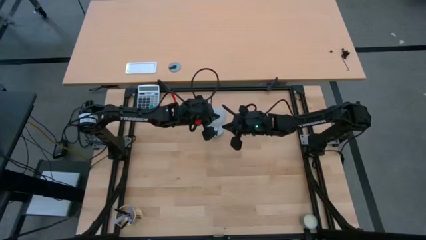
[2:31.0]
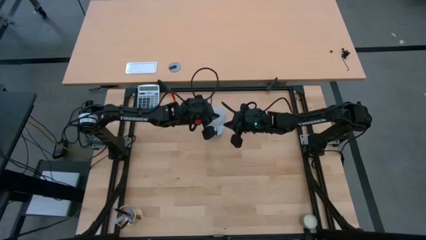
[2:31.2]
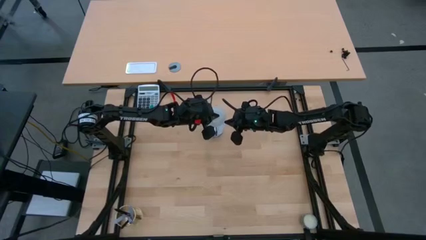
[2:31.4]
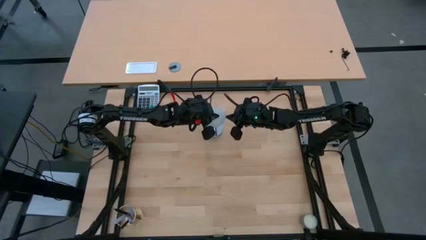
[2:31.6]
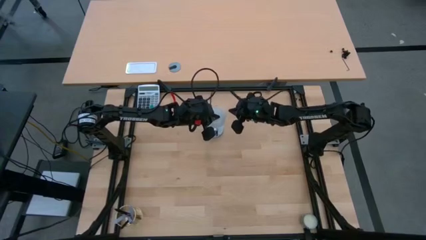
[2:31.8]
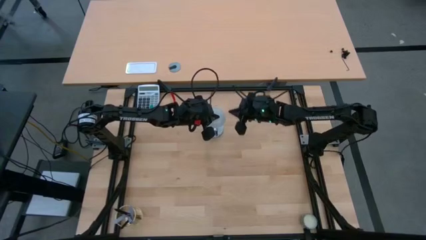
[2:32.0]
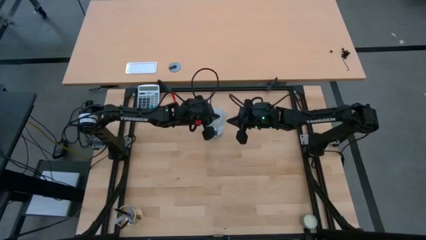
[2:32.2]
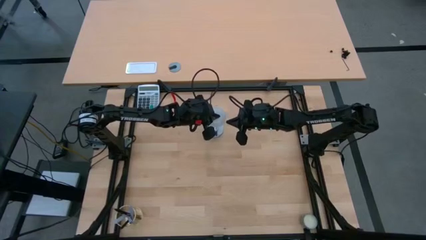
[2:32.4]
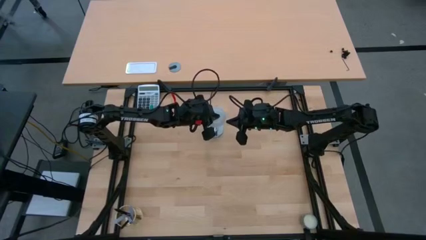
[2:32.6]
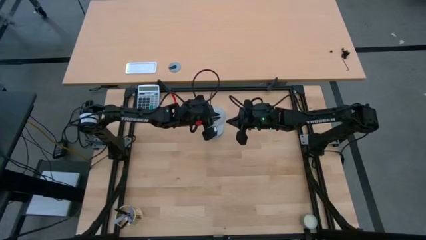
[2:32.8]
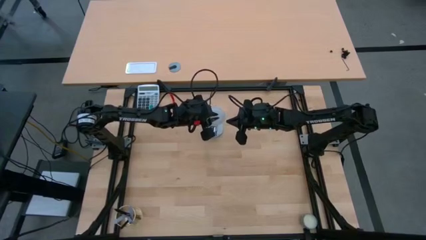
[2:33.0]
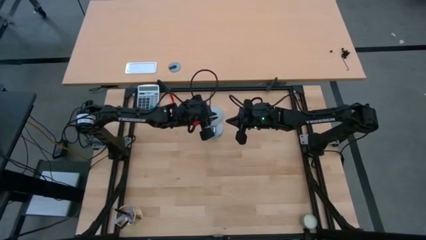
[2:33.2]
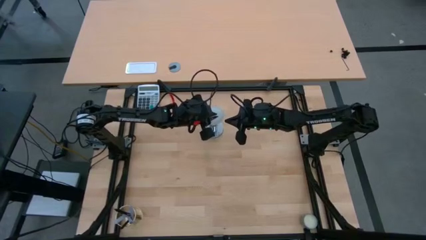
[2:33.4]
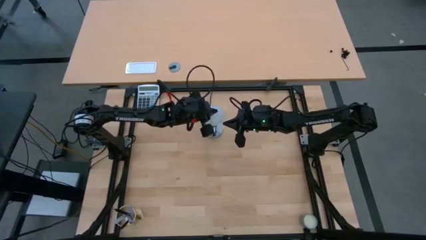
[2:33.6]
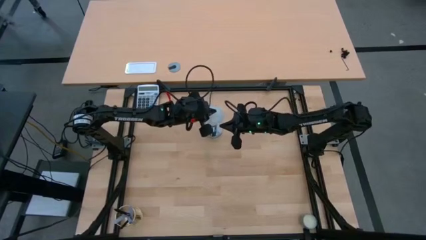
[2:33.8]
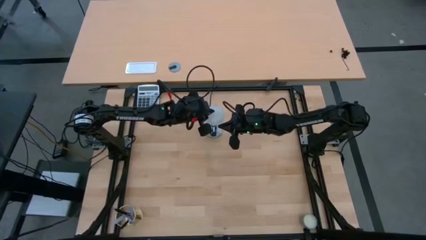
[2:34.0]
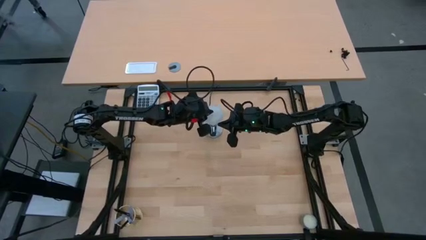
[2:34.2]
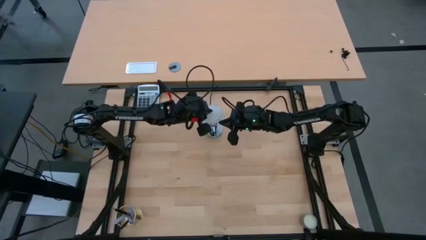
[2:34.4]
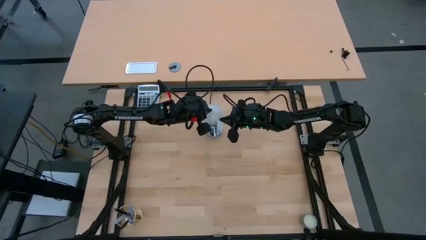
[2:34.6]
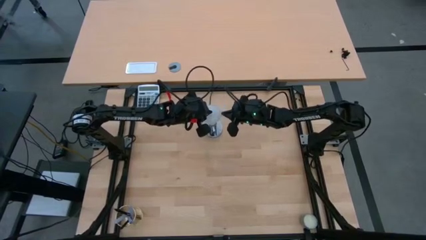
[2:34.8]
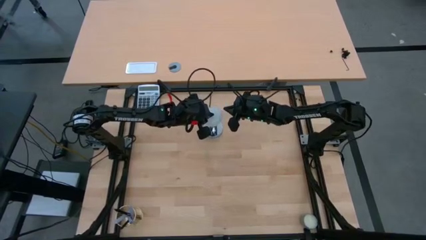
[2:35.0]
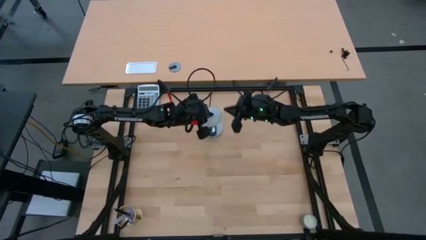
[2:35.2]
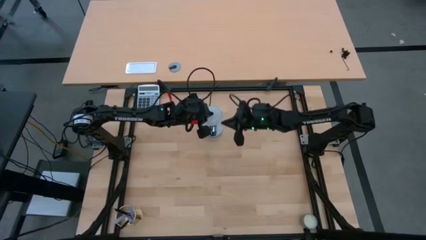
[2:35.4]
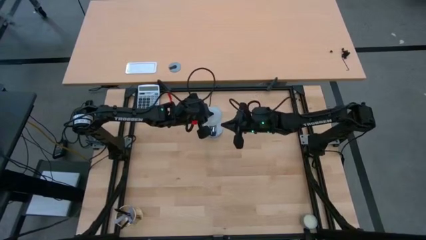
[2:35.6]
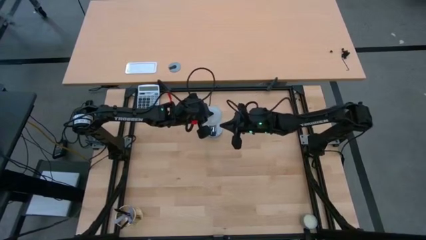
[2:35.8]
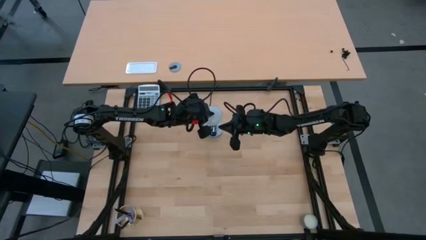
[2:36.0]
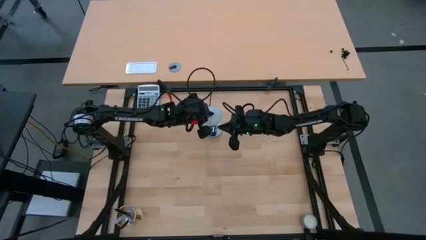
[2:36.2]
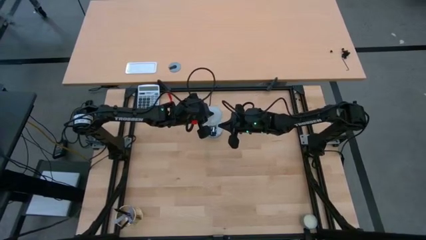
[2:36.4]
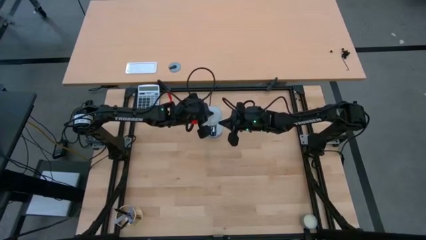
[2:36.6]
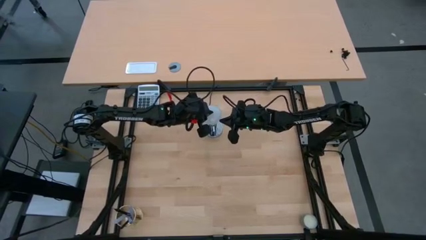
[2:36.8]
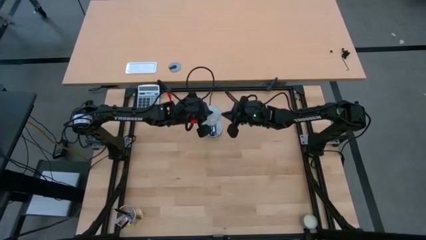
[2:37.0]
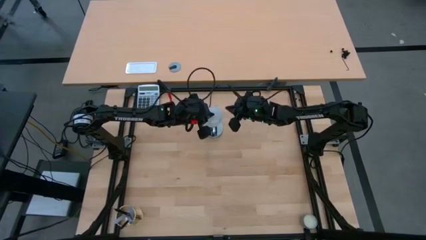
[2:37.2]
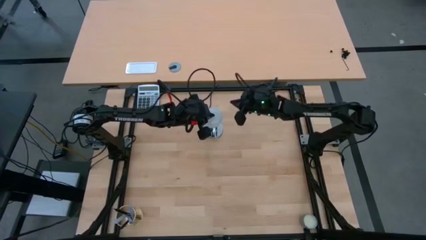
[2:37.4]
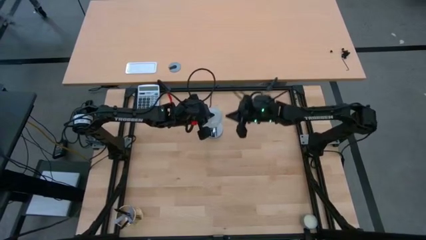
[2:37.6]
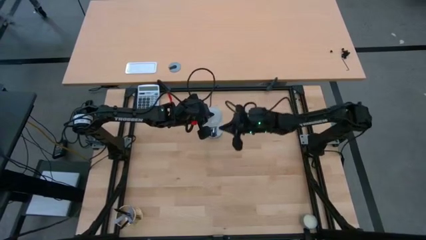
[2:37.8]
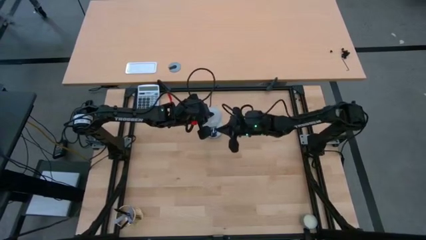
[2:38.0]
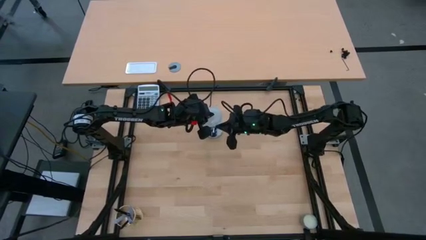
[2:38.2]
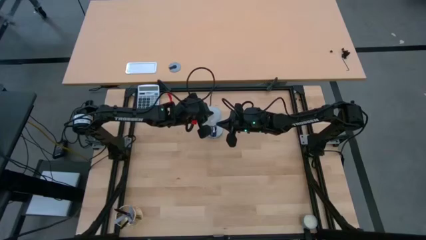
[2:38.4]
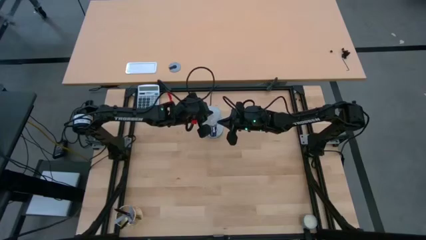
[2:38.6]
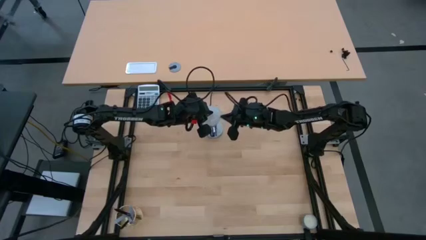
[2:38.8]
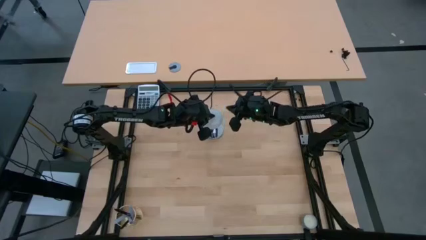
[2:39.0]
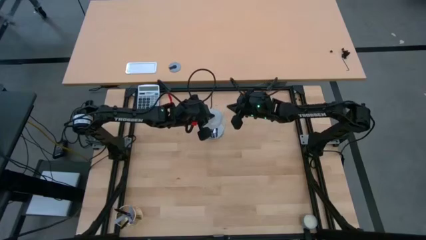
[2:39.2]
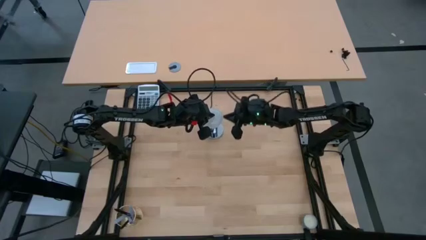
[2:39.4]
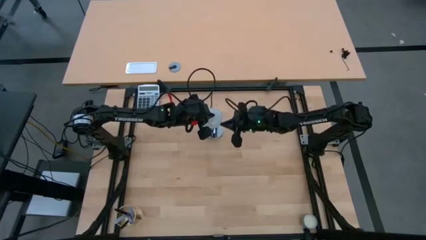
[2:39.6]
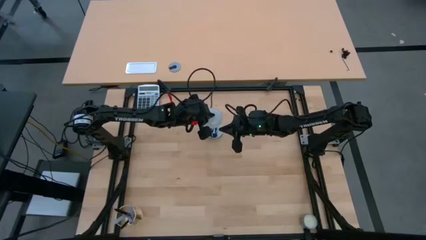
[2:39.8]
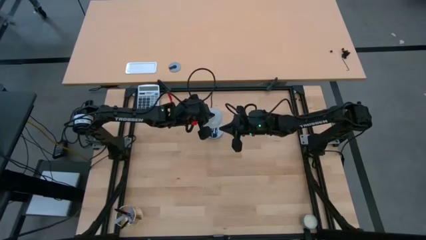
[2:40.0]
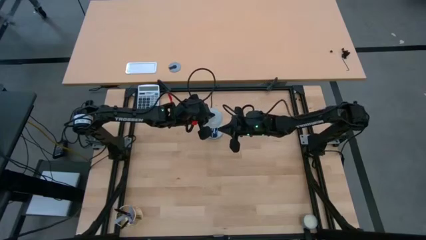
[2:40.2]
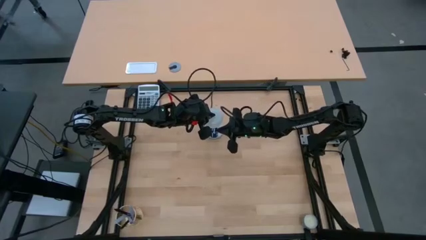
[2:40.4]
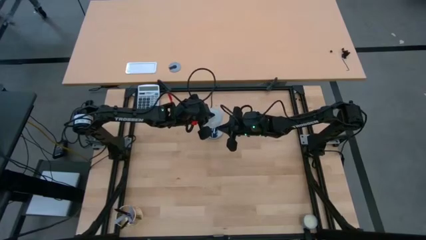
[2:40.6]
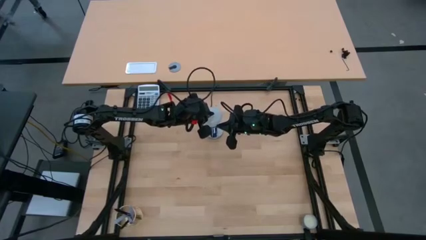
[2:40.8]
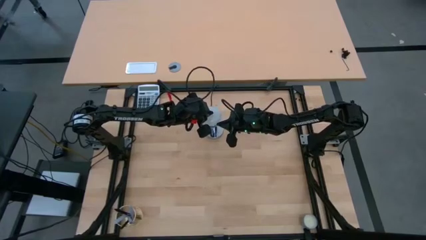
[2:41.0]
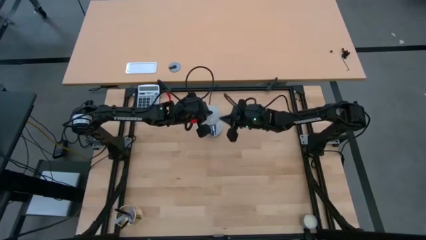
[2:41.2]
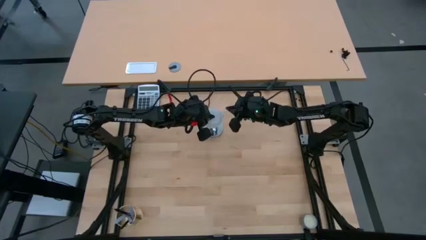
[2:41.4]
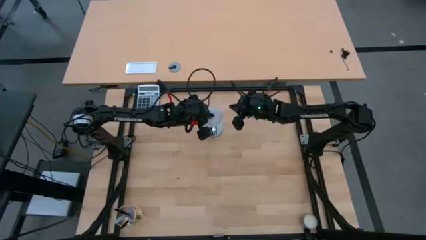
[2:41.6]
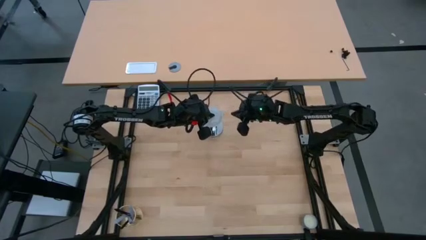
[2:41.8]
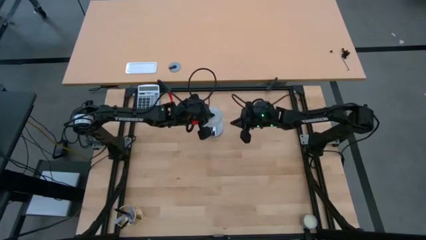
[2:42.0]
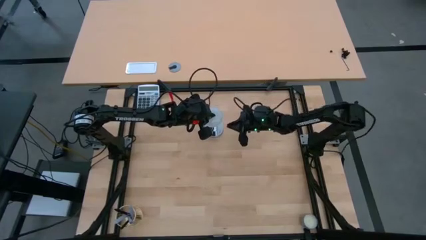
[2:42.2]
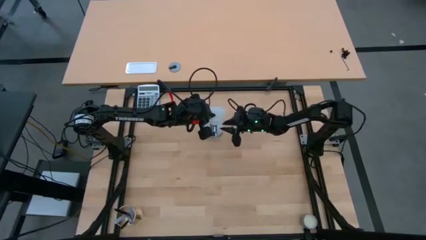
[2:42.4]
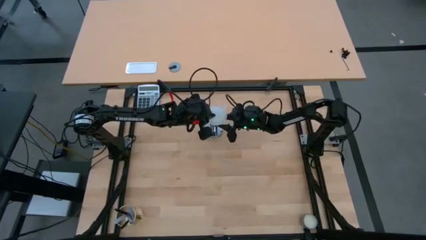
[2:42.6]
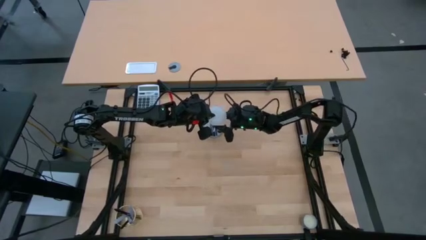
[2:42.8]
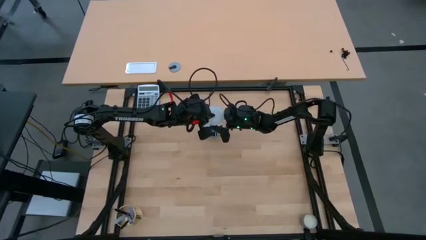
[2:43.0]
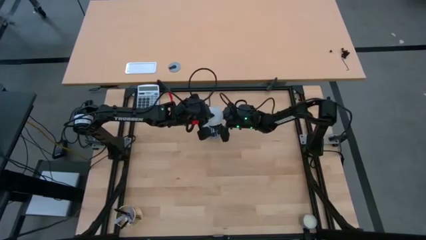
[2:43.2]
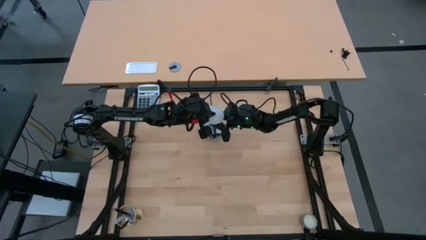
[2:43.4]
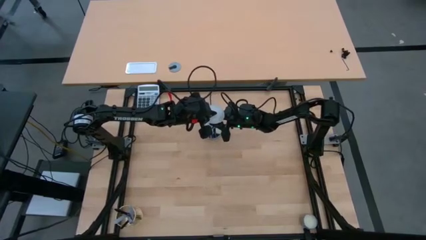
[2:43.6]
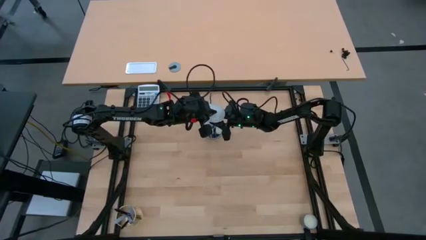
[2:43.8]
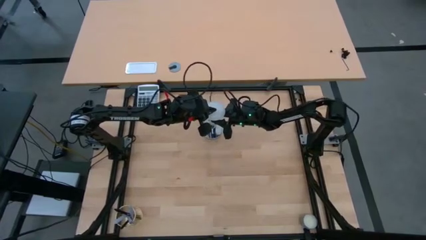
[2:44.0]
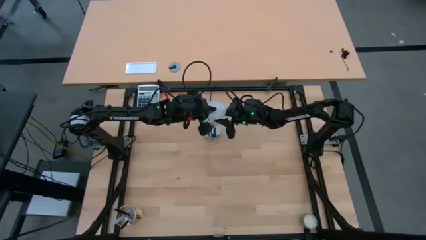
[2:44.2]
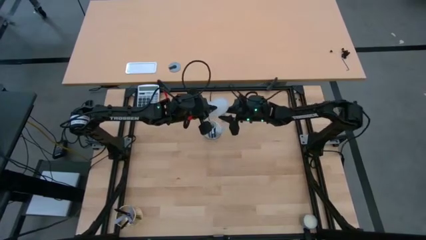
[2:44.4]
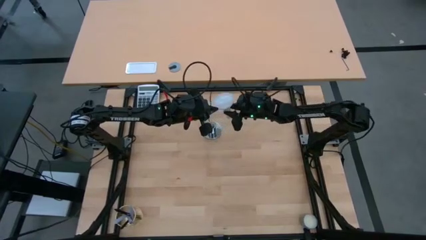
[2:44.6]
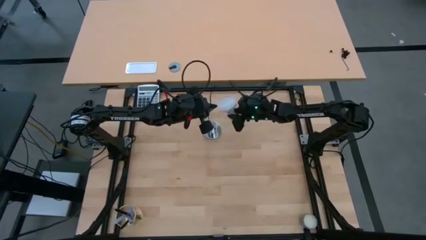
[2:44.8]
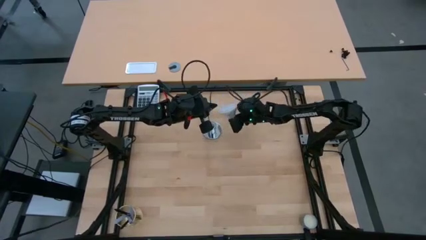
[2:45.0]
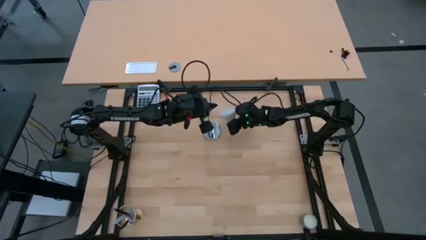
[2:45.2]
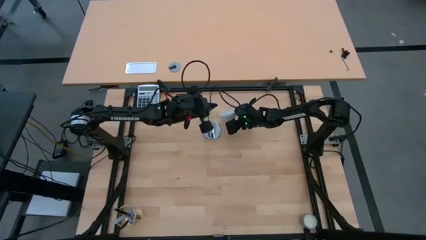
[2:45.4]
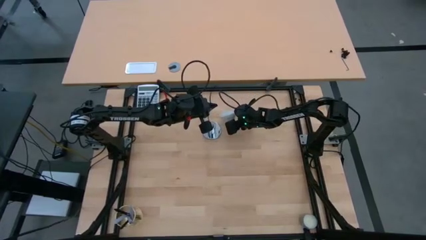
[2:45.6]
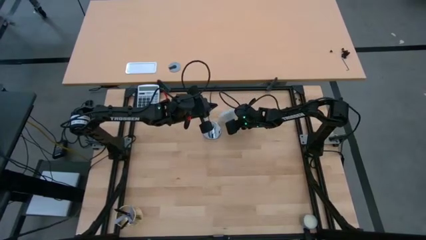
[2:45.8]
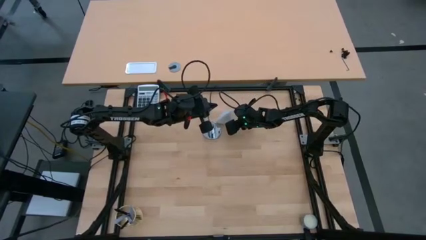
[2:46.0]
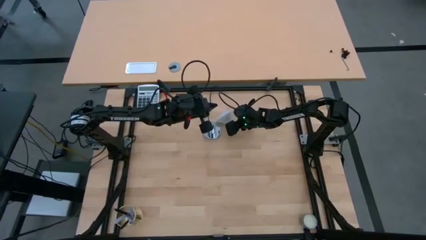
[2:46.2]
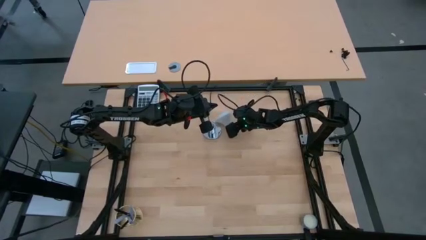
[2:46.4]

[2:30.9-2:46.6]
Task: Screw lightbulb
Remove the lightbulb from the lamp
